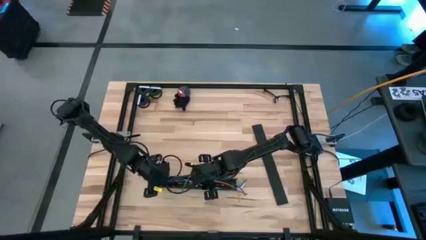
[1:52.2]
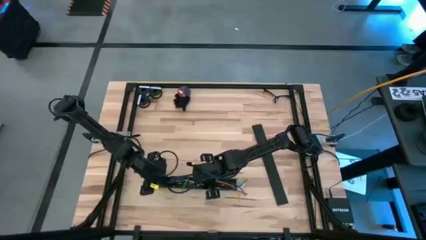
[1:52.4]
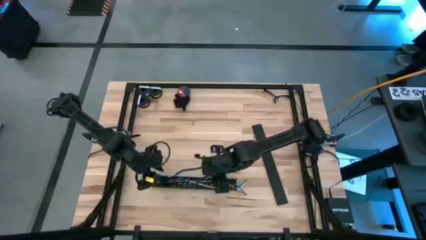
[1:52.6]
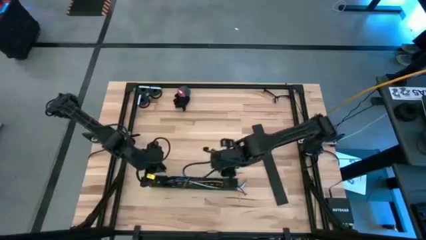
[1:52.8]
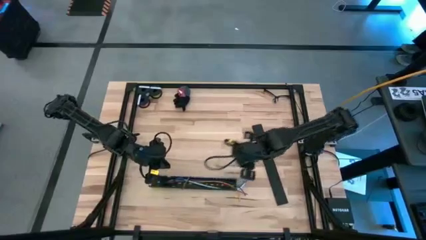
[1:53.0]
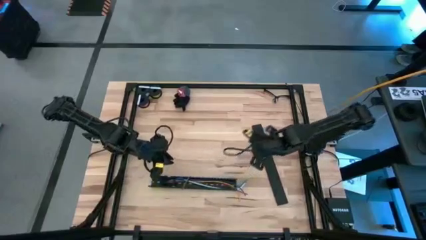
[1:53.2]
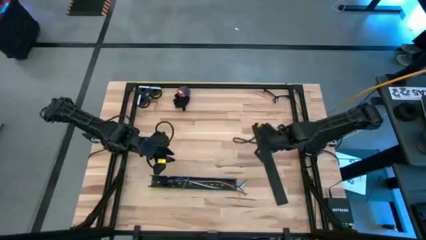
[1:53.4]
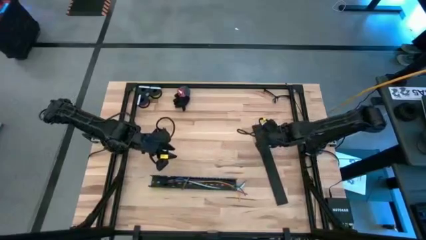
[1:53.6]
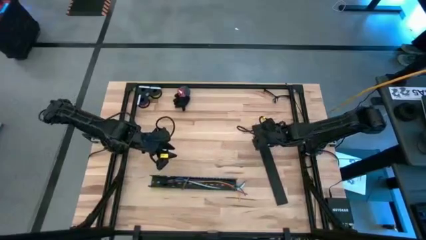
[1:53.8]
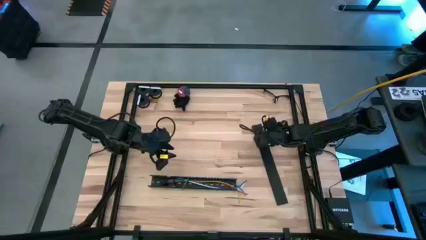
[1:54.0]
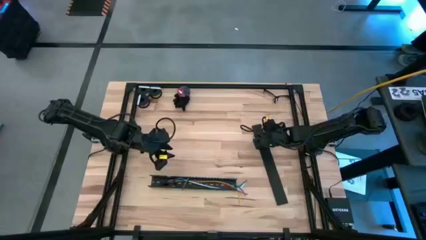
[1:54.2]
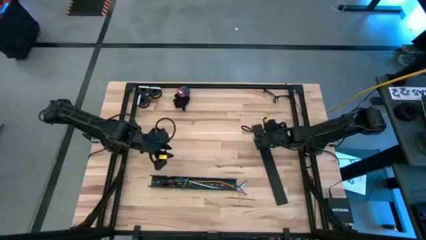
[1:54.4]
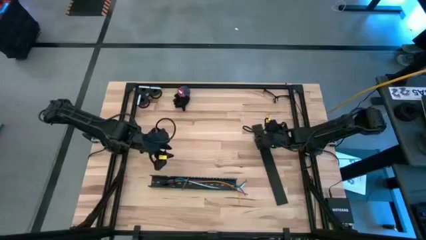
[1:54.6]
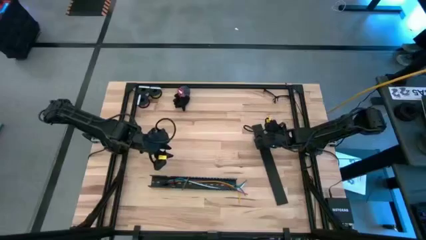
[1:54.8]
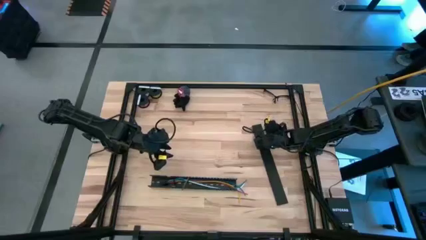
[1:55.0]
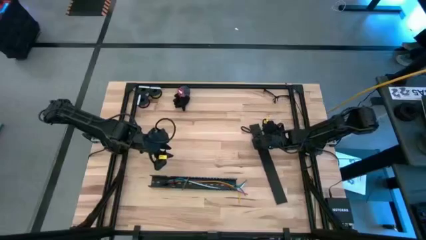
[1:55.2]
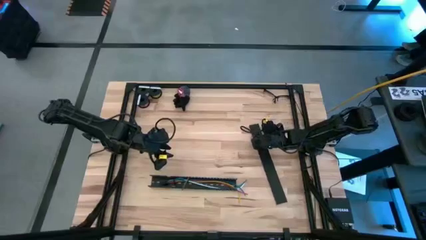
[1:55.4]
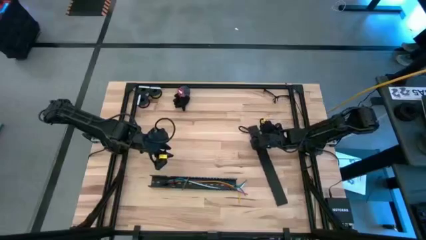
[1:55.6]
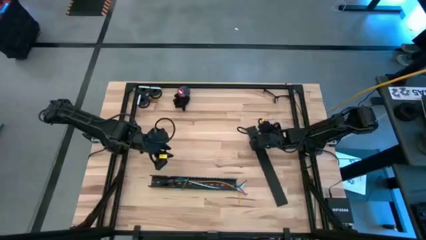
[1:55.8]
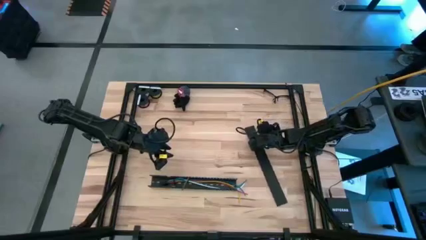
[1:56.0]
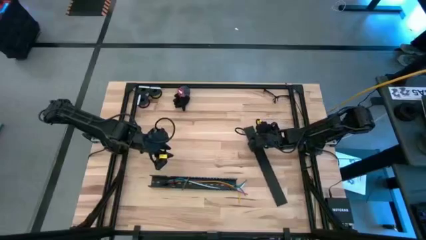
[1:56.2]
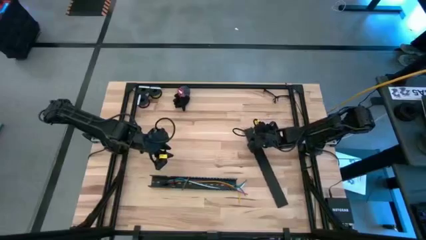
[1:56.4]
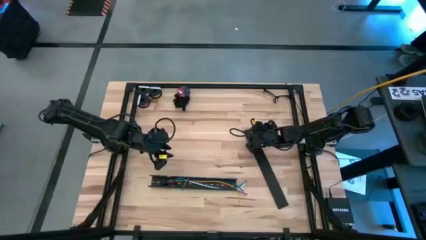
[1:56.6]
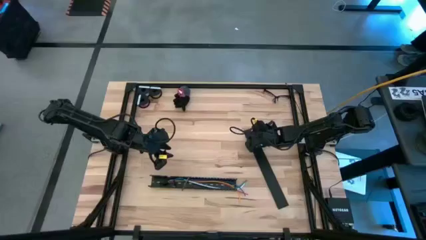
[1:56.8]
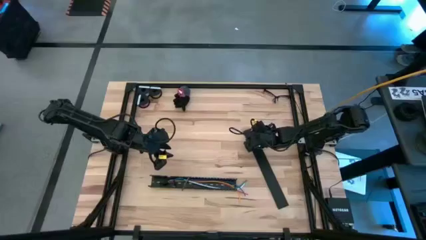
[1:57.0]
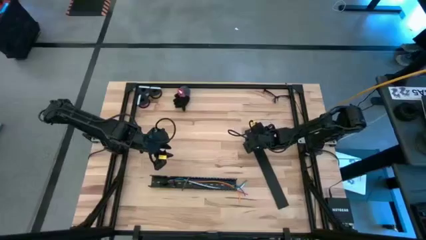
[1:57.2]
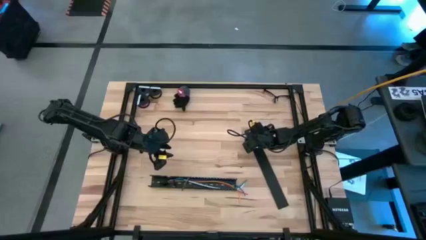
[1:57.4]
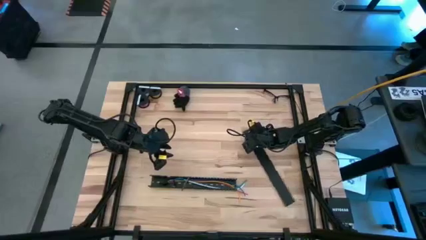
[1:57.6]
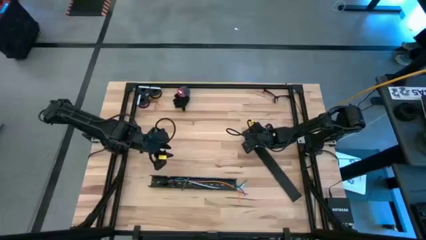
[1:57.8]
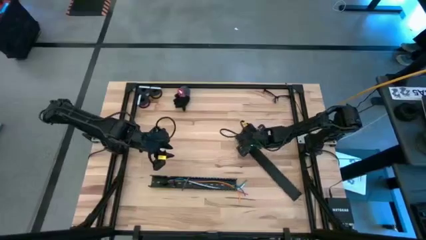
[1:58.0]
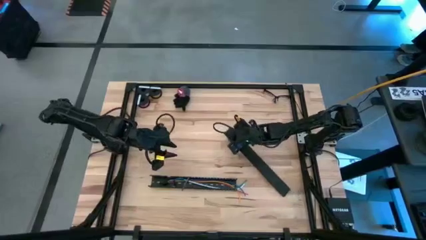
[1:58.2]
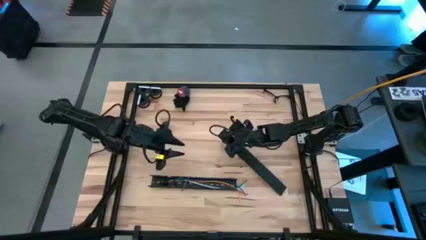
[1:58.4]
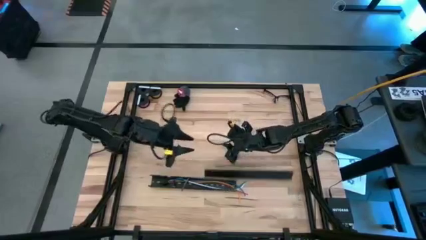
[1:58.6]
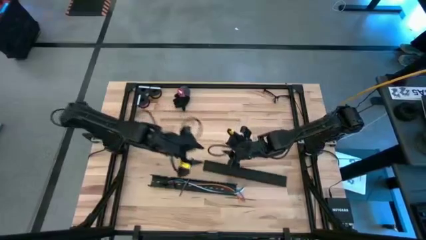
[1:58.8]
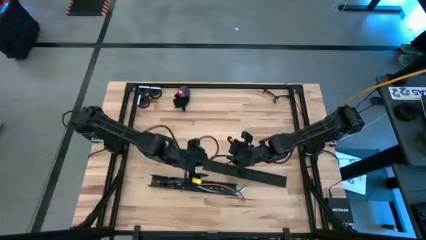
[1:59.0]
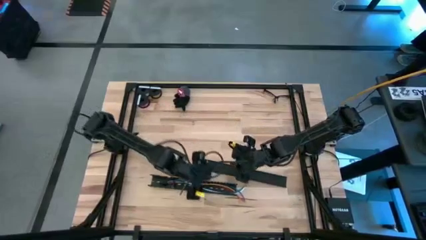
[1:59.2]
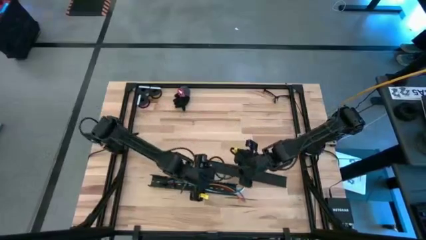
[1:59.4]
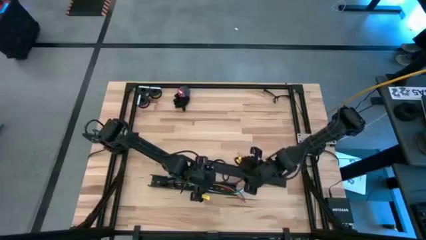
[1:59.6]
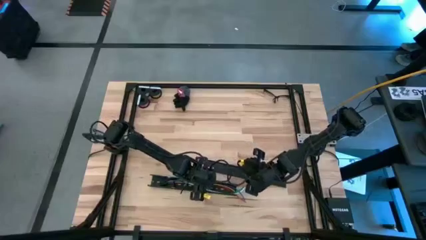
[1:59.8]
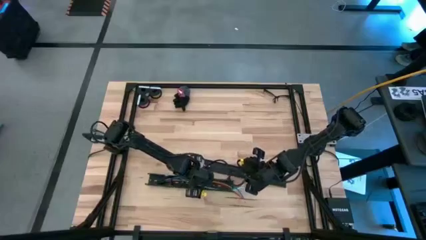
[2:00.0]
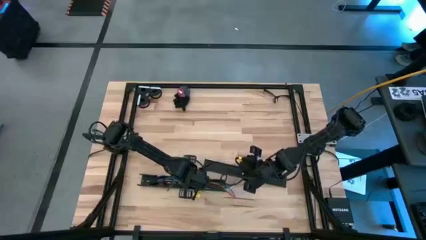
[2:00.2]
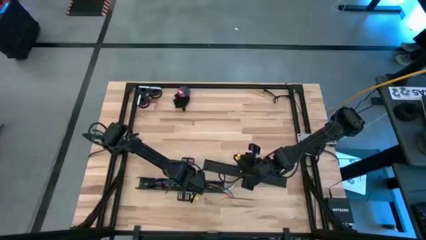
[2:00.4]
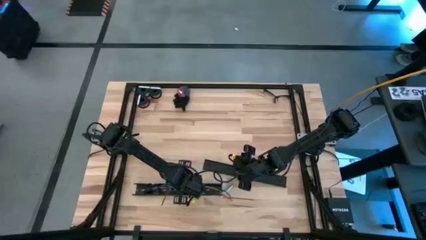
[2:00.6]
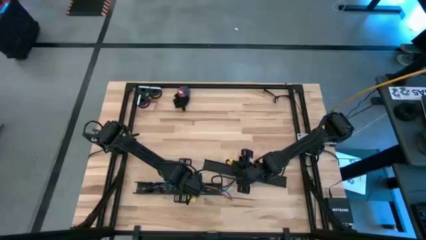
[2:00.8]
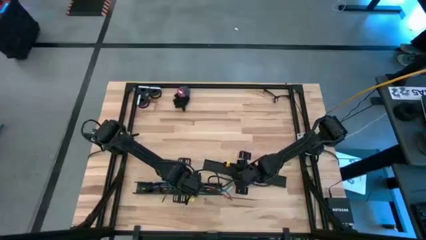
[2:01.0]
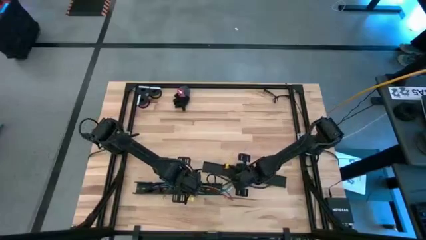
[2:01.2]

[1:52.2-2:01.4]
Task: Ziptie cables
Close the black cable duct

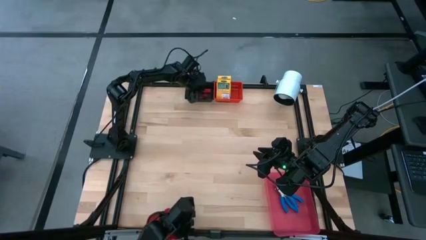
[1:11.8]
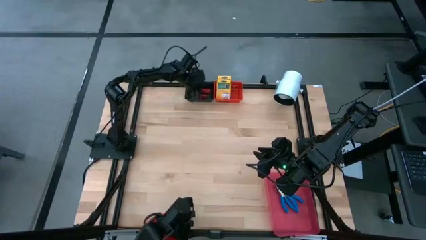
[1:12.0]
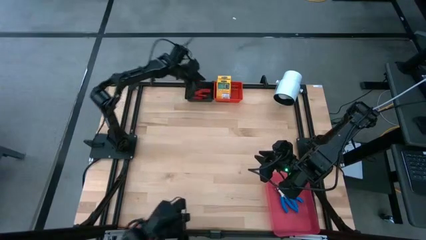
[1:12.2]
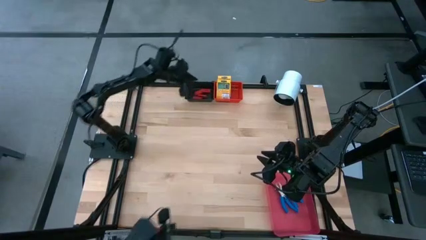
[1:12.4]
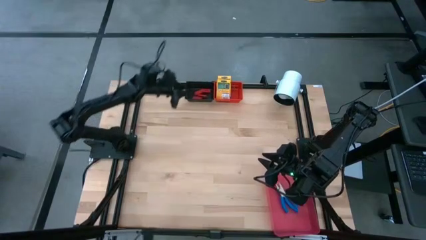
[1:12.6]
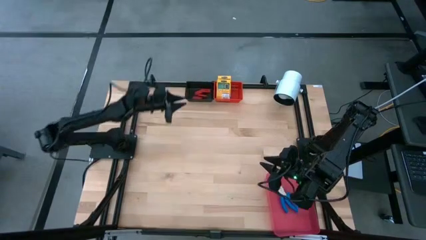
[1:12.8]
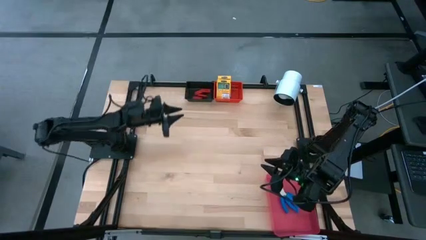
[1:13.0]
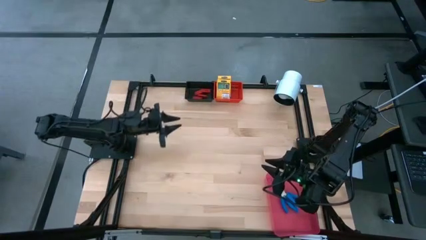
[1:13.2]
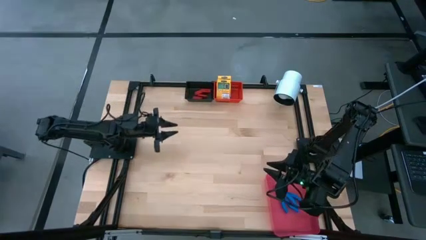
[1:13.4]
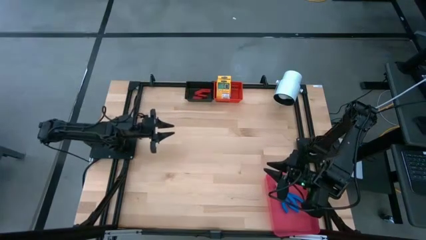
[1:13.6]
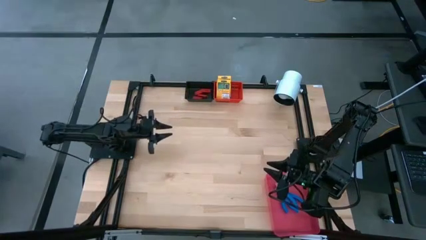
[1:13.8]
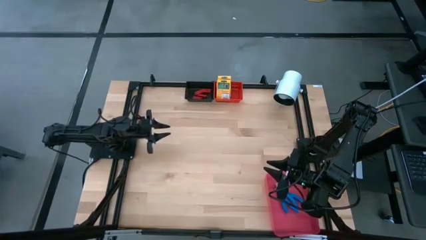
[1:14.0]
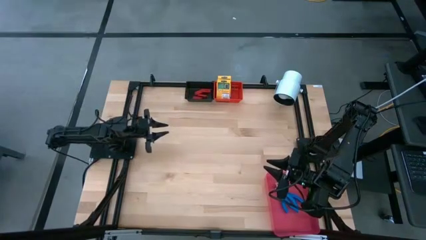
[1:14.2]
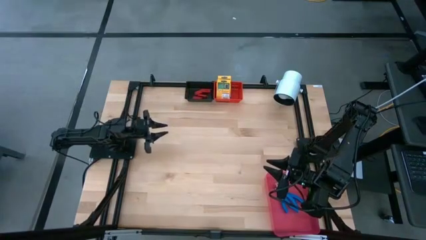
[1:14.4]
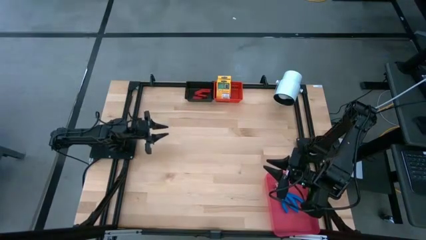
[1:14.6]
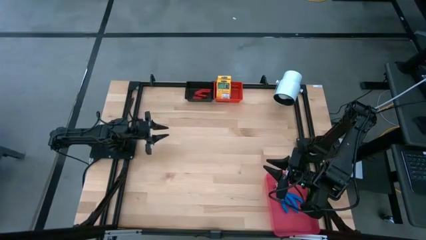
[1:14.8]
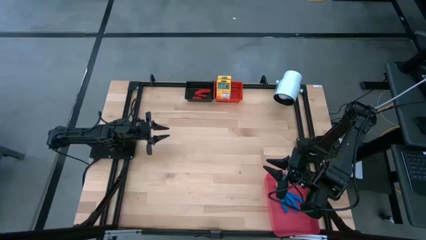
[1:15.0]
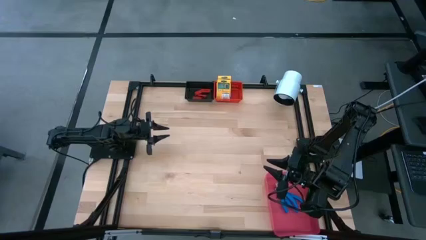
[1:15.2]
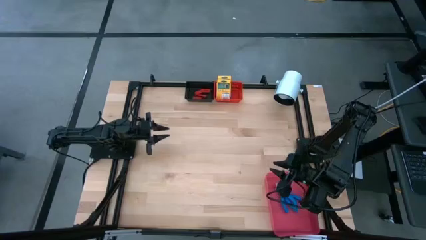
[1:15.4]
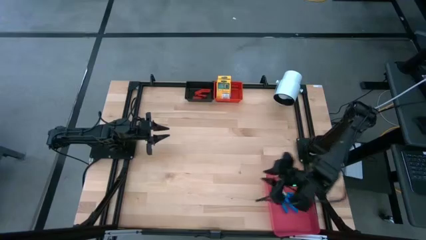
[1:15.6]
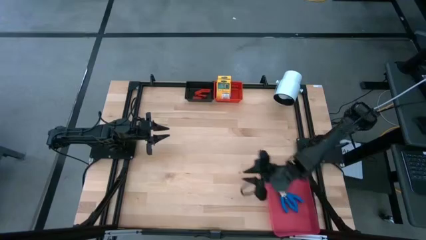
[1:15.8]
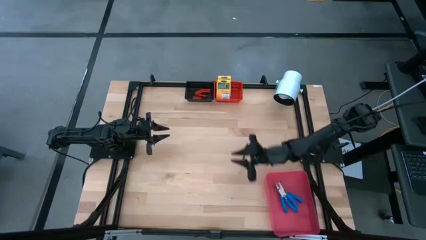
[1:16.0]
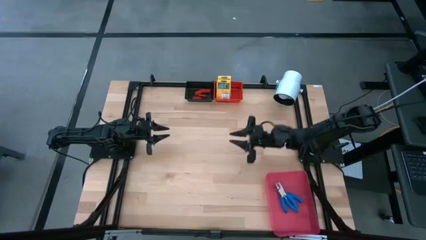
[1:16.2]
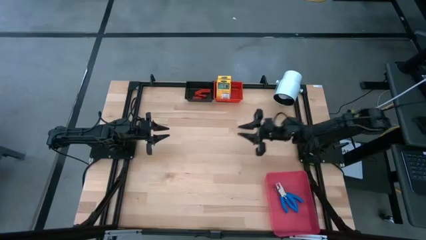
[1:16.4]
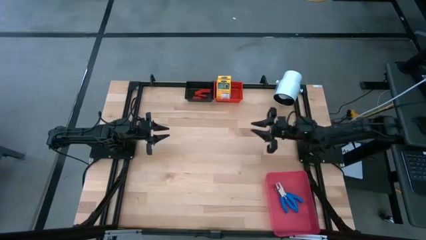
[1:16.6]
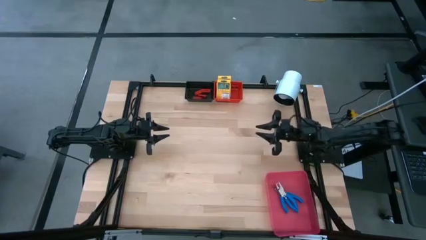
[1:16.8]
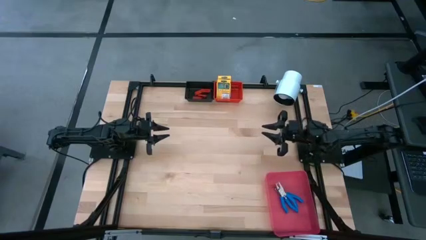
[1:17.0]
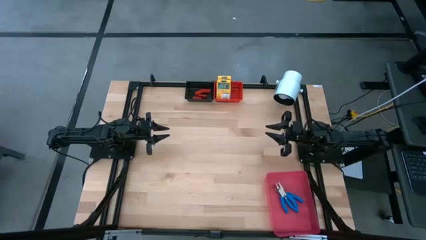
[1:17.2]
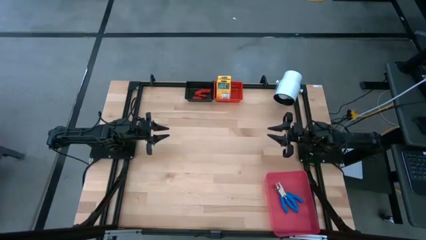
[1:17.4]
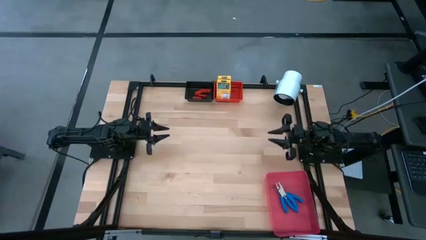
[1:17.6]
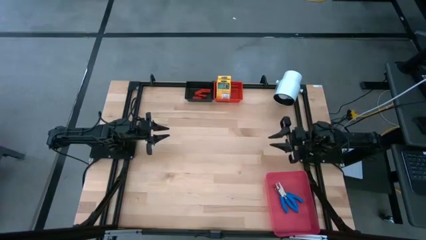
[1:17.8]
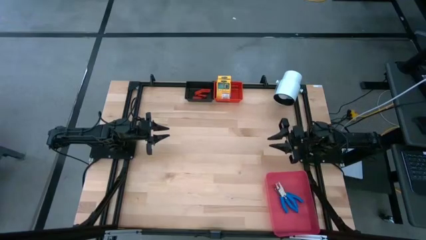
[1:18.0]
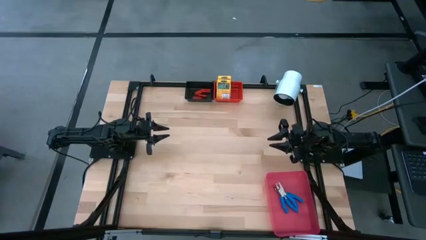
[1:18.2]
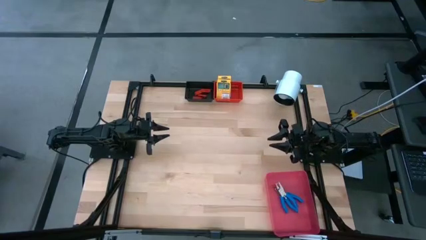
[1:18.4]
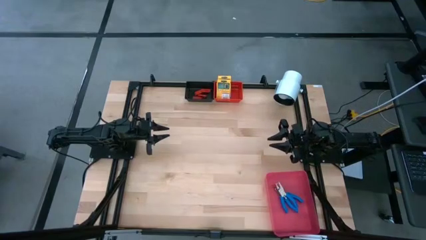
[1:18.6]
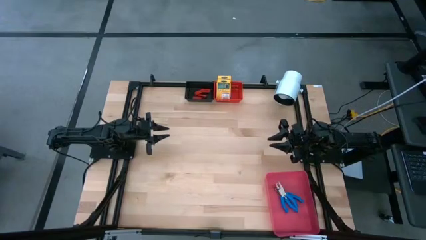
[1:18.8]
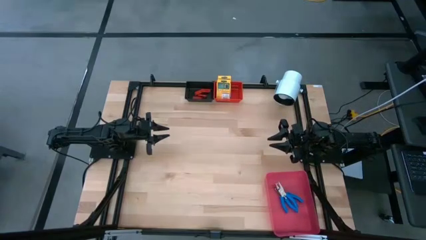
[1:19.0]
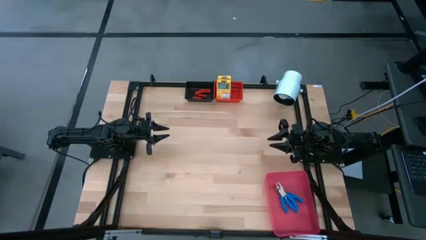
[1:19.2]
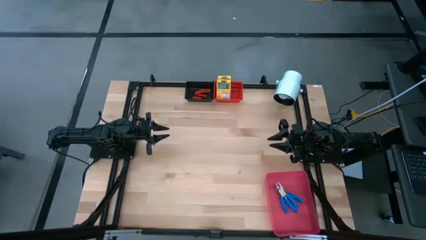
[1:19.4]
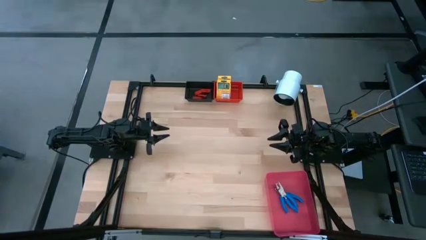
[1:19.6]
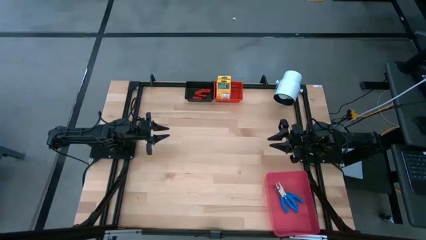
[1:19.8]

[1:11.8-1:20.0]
Task: Pick & Place School Supplies
Return to Home Position
